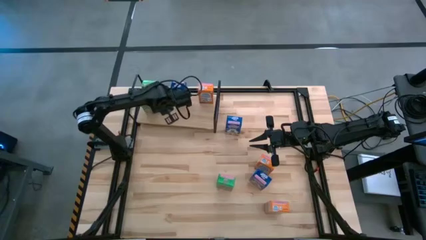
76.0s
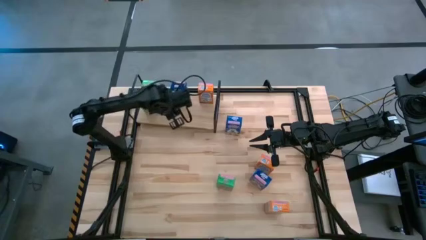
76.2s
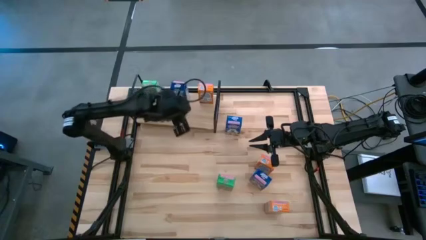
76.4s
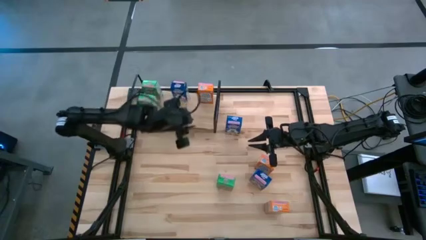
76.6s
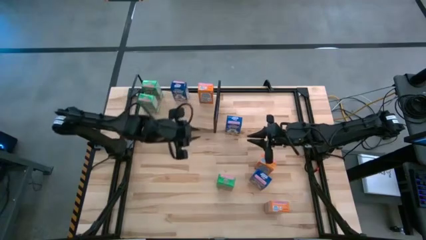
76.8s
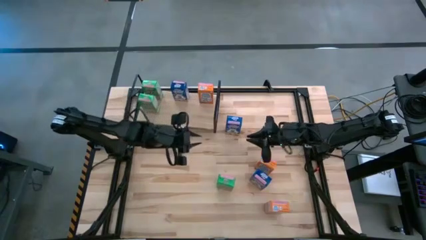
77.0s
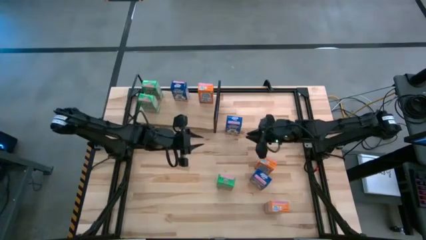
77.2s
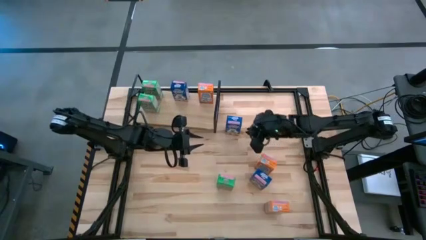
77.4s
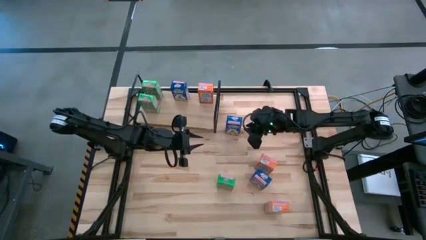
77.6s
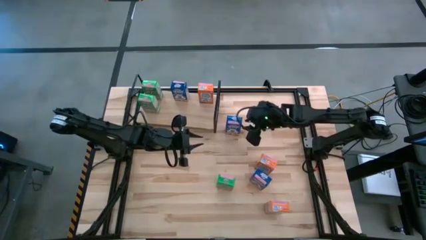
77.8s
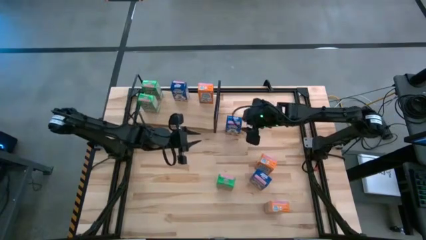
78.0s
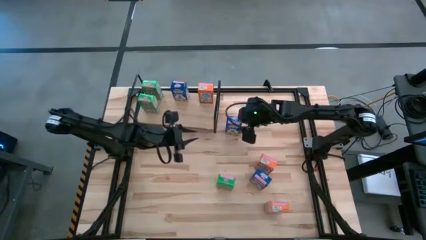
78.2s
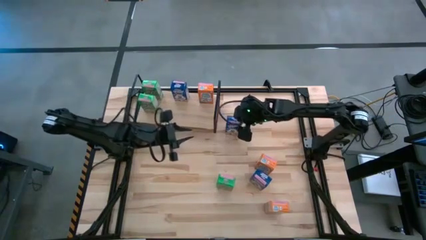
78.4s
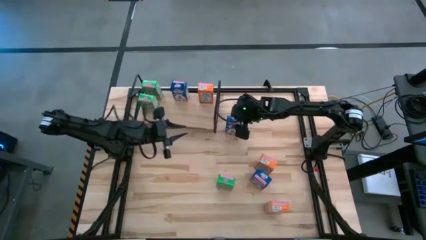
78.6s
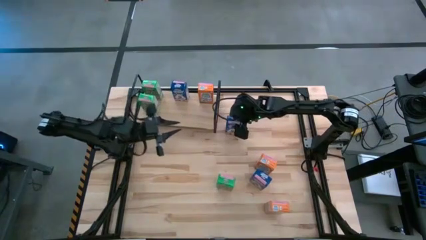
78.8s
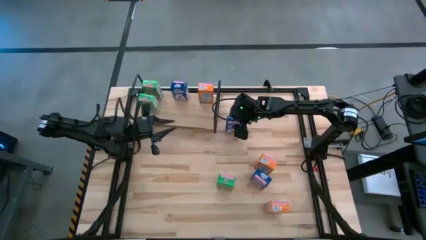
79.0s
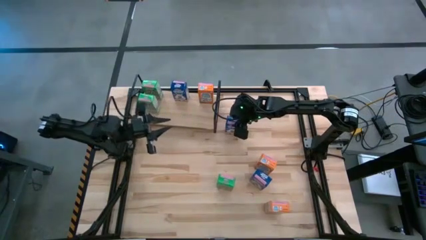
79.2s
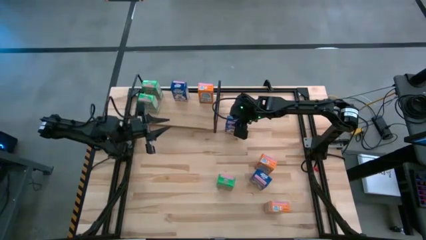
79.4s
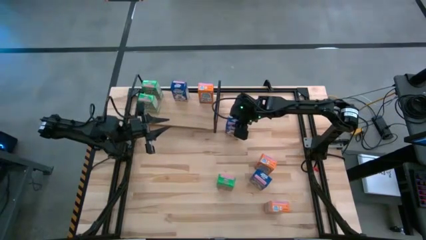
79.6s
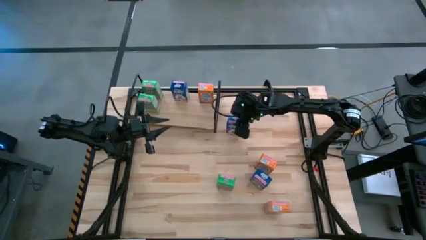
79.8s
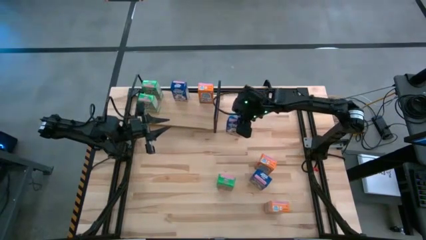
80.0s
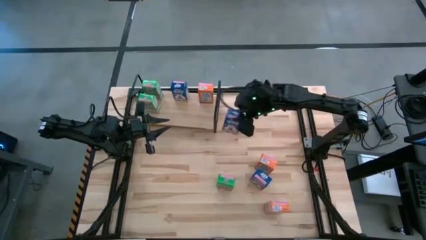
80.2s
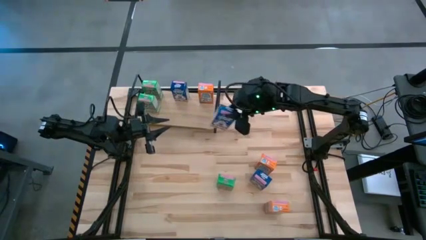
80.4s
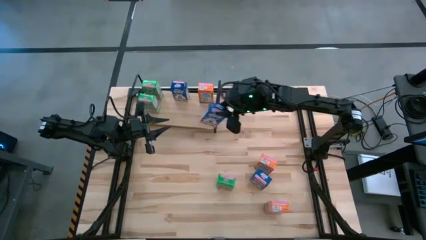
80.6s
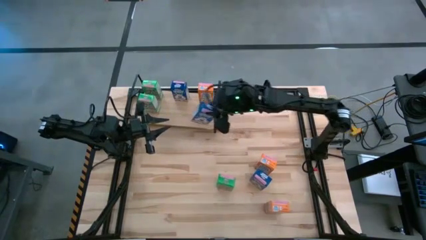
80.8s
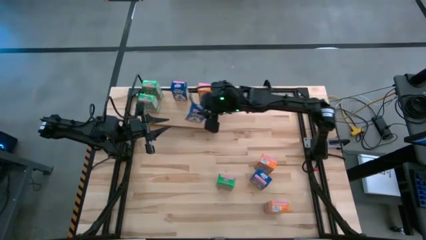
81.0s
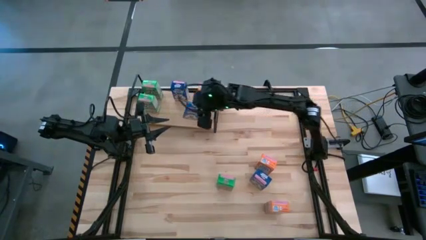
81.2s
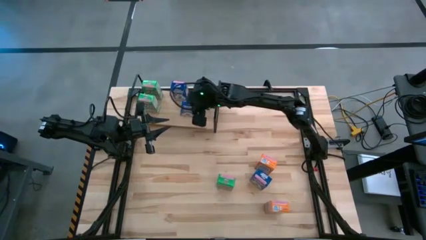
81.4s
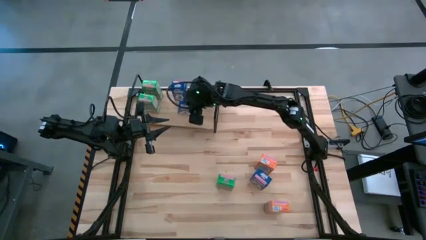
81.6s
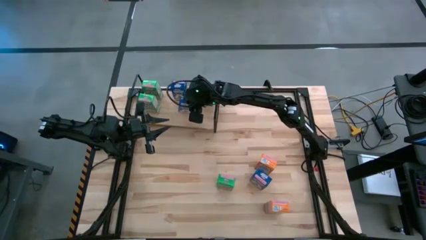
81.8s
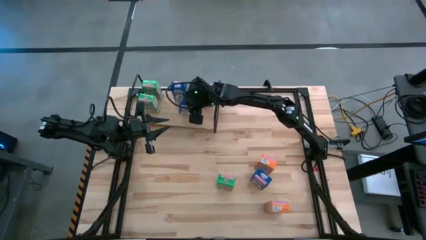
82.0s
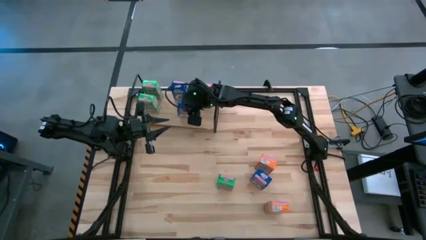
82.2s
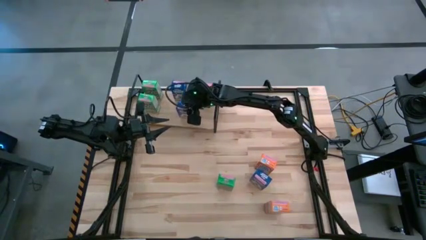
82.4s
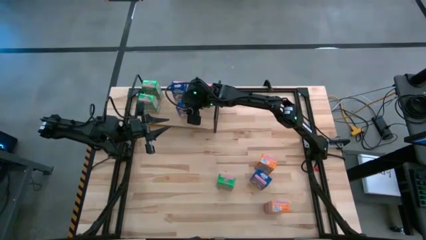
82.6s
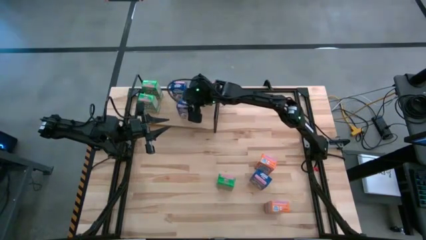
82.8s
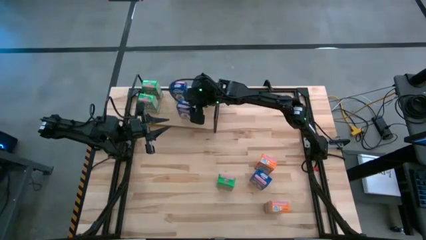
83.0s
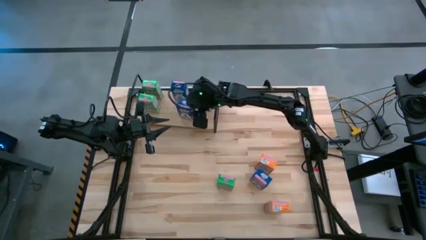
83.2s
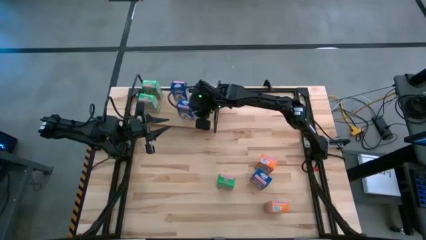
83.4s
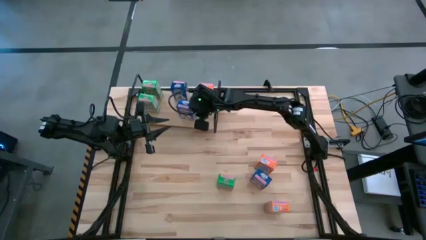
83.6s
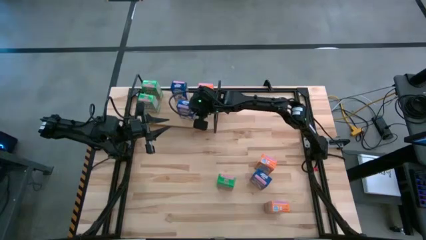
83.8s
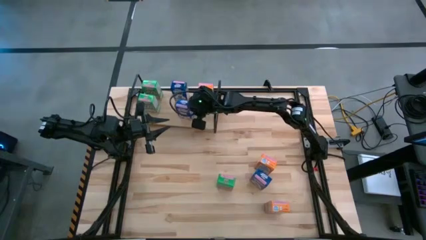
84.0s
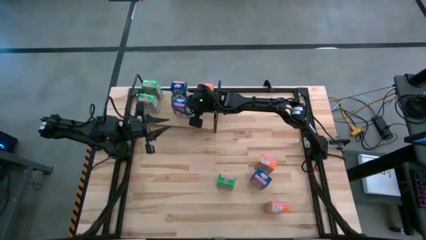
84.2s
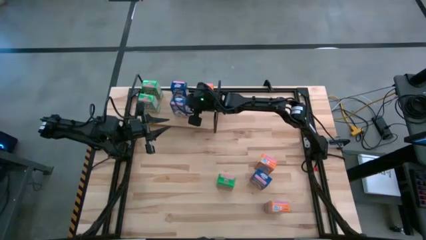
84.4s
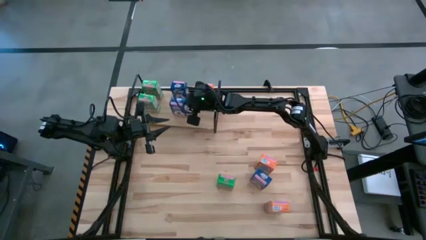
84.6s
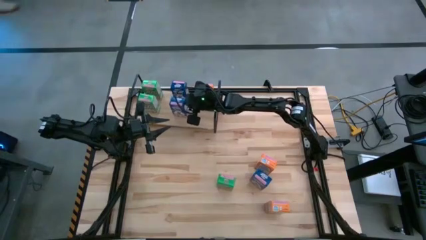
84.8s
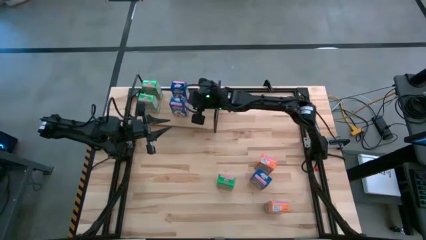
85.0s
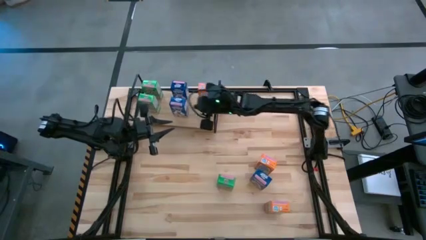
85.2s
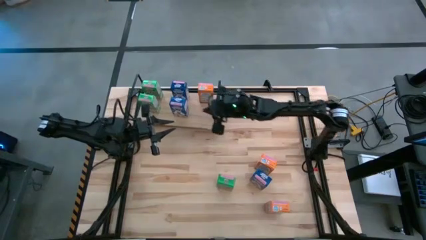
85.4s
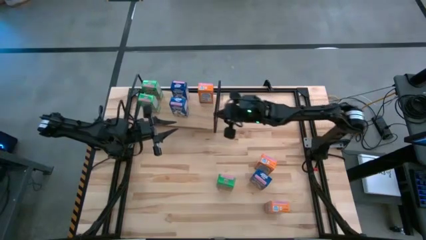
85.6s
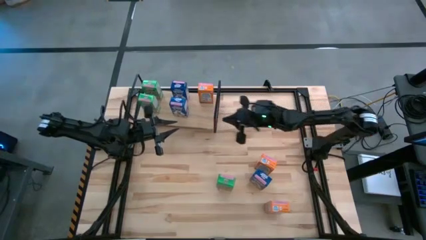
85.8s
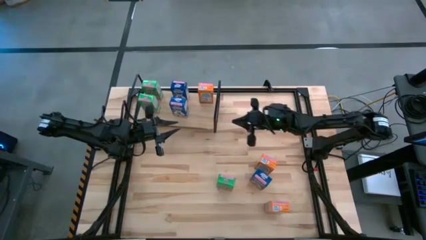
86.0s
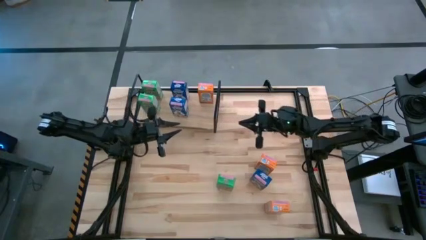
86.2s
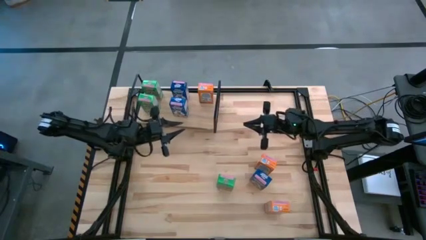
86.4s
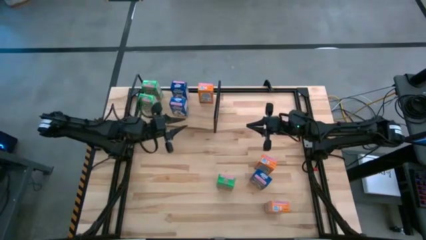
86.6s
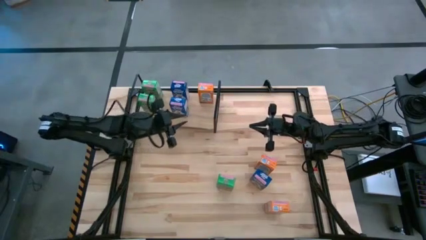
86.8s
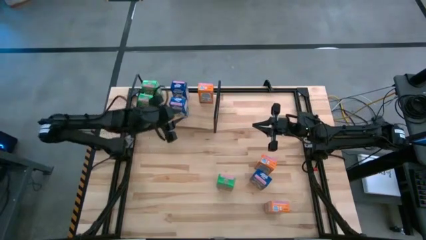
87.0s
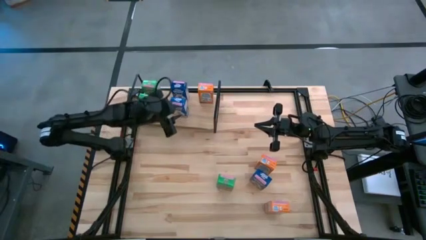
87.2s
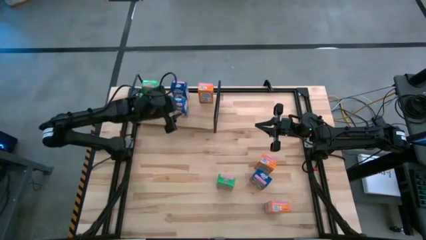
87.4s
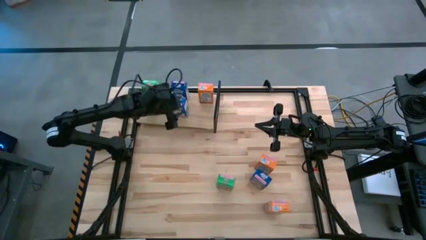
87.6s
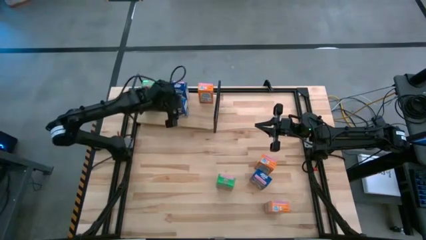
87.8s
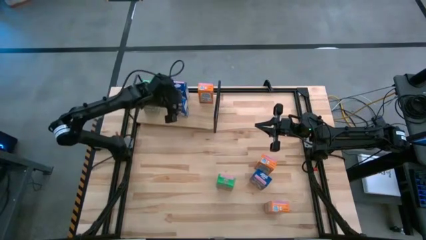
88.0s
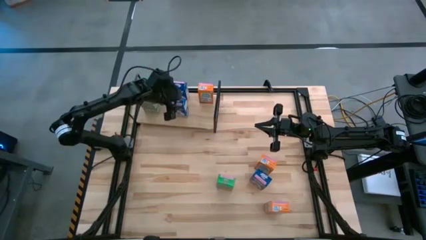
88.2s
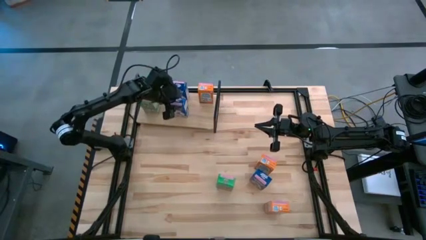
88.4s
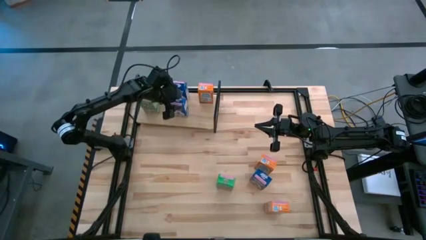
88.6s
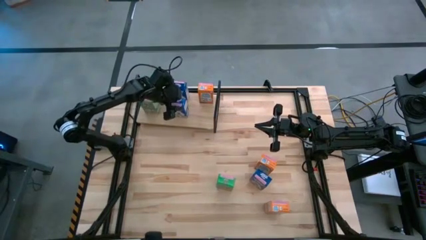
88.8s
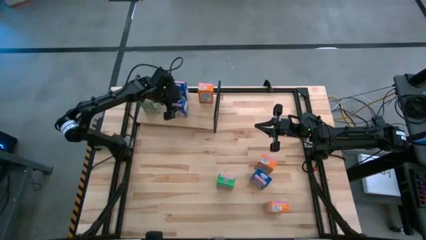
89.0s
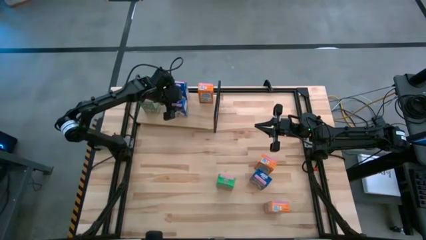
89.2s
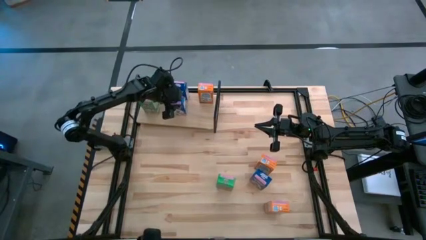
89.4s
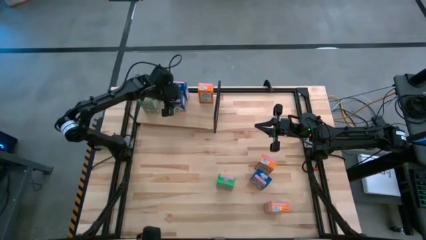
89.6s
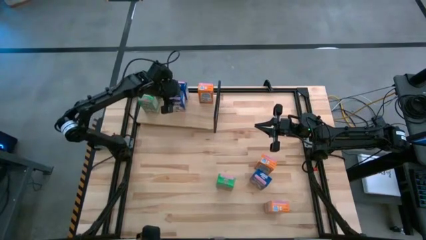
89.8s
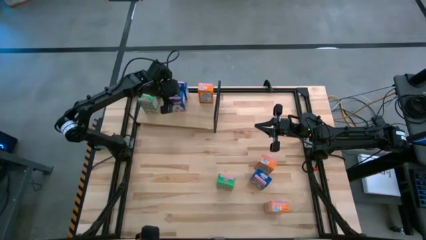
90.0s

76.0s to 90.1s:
Task: Stack cereal on shelf
Put the top blue cereal box on the shelf aligned with the blue cereal box
